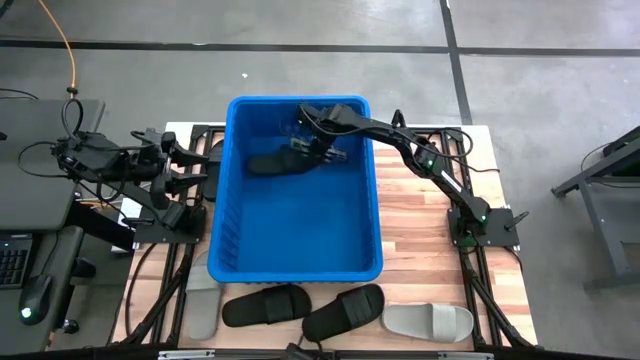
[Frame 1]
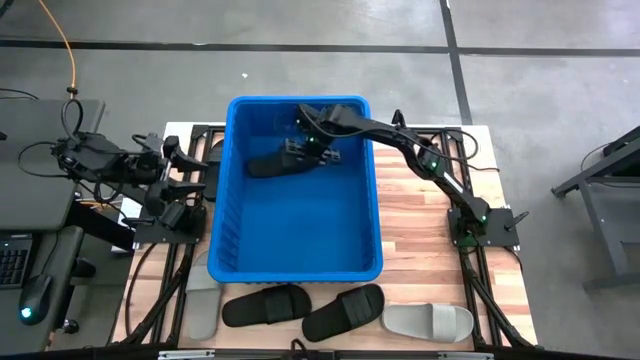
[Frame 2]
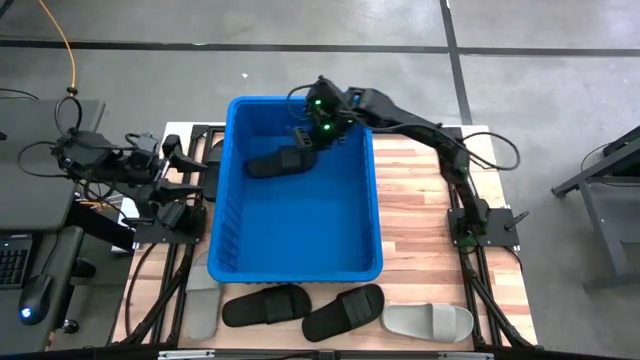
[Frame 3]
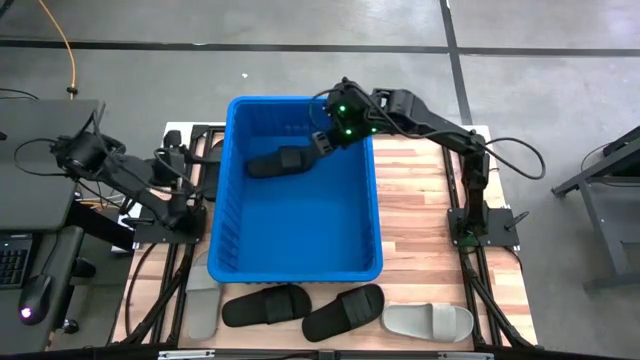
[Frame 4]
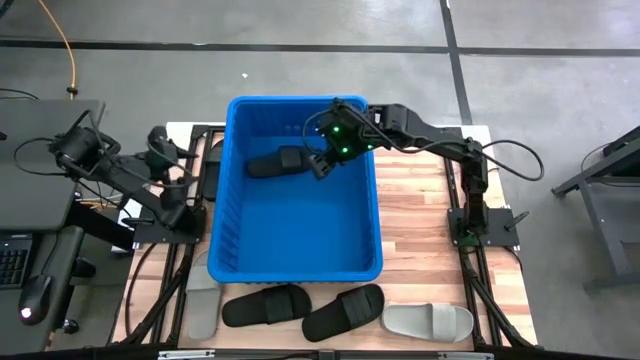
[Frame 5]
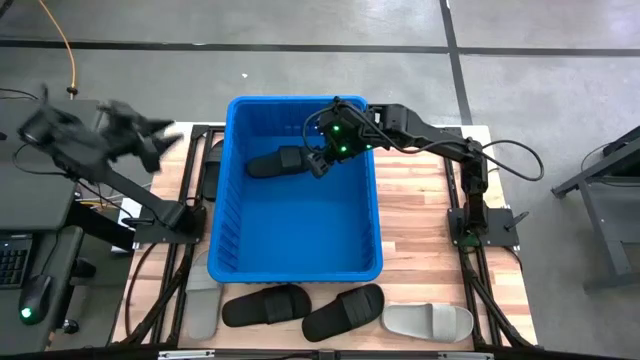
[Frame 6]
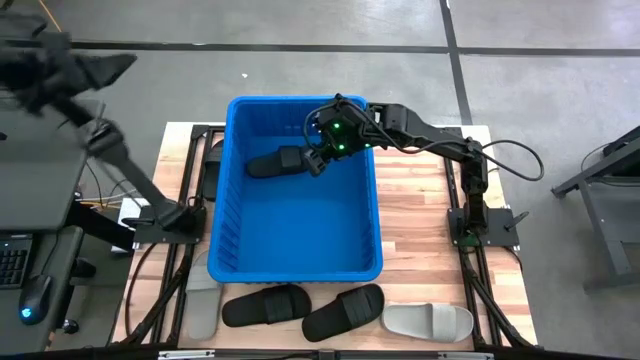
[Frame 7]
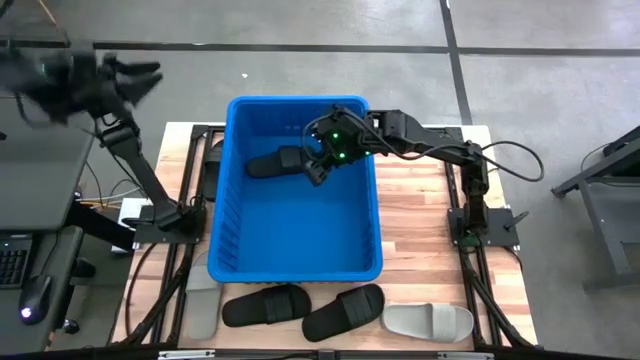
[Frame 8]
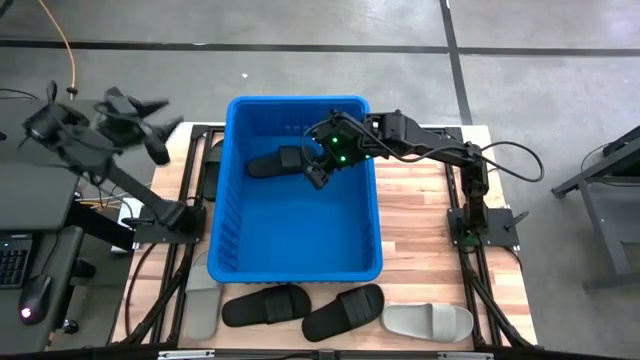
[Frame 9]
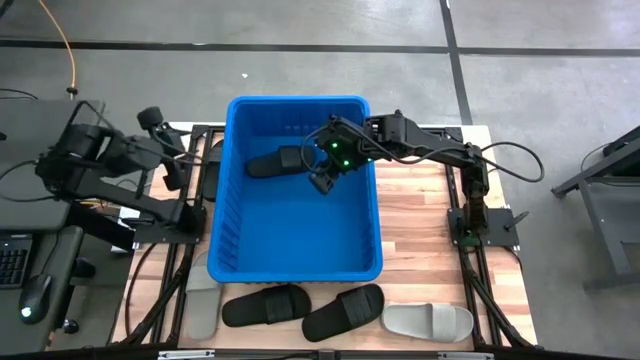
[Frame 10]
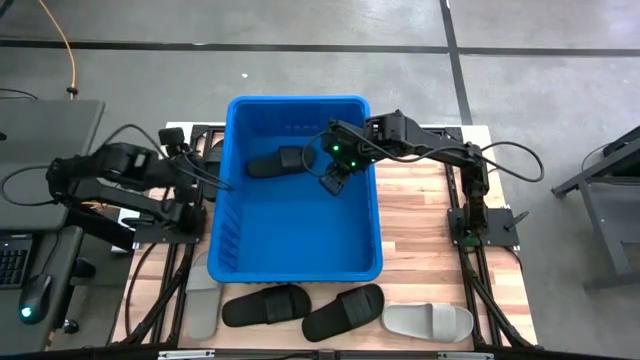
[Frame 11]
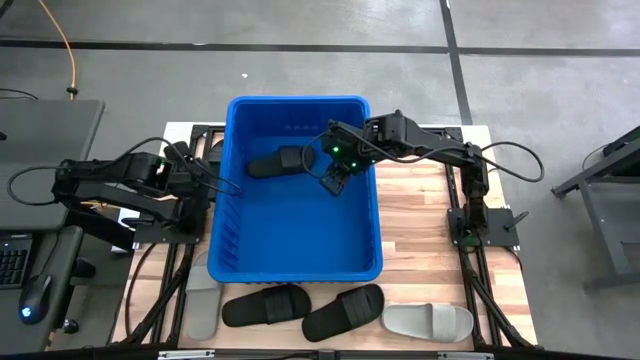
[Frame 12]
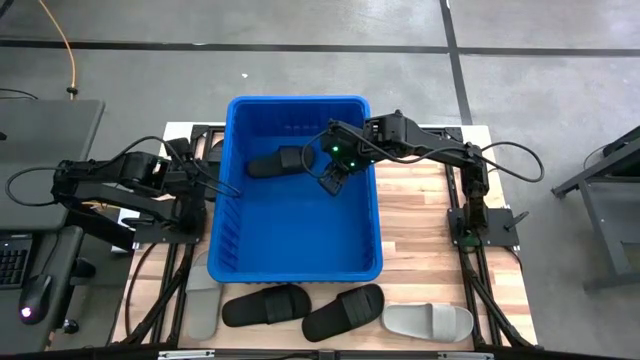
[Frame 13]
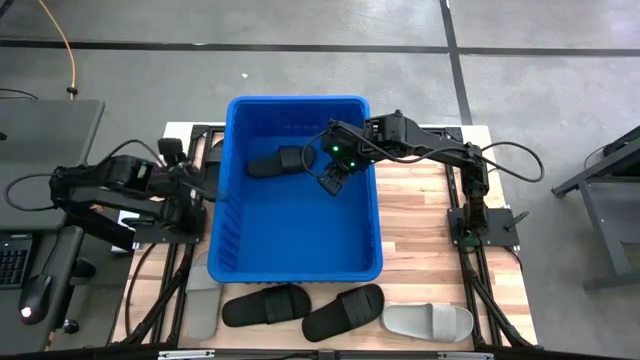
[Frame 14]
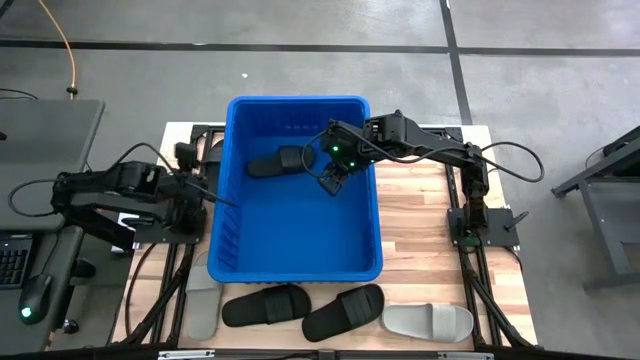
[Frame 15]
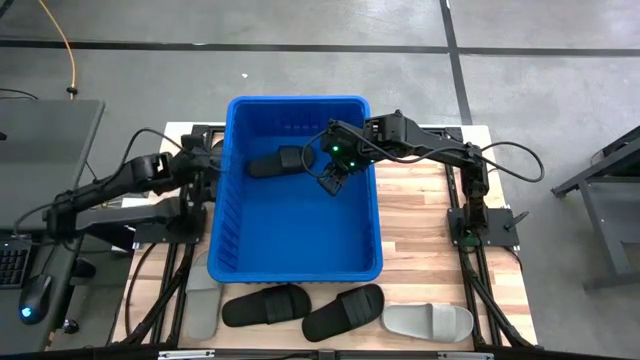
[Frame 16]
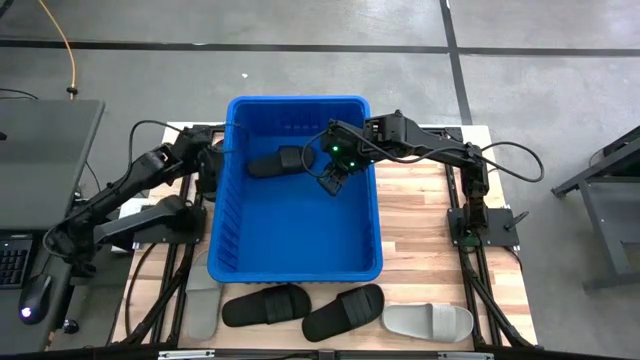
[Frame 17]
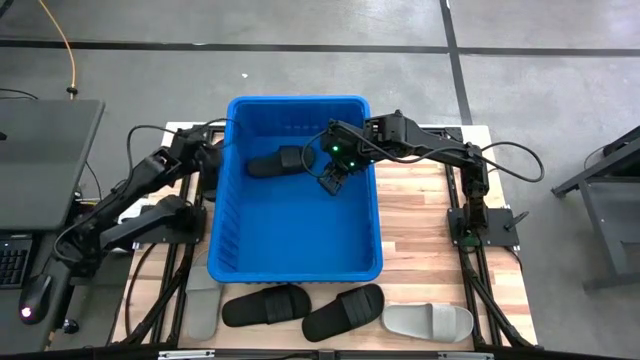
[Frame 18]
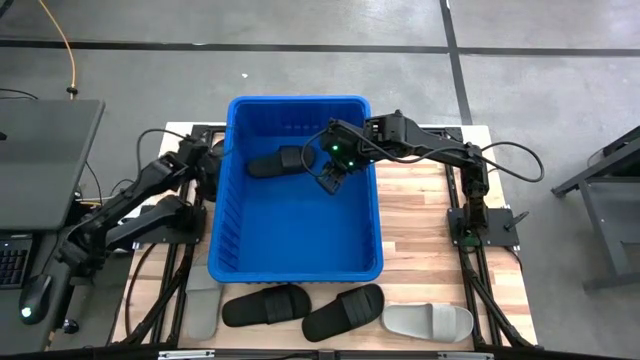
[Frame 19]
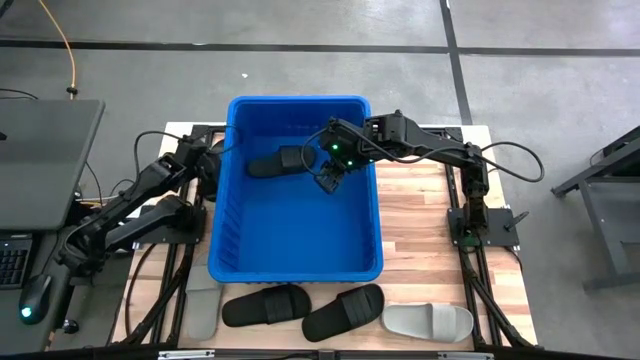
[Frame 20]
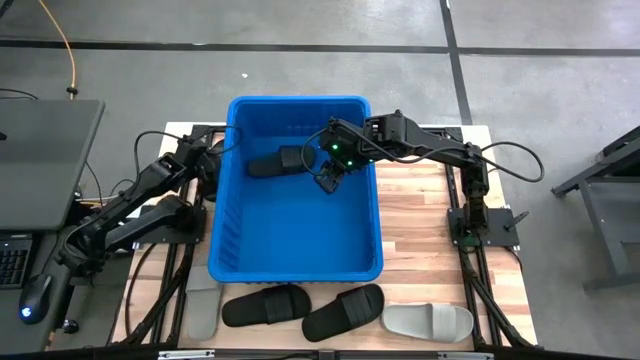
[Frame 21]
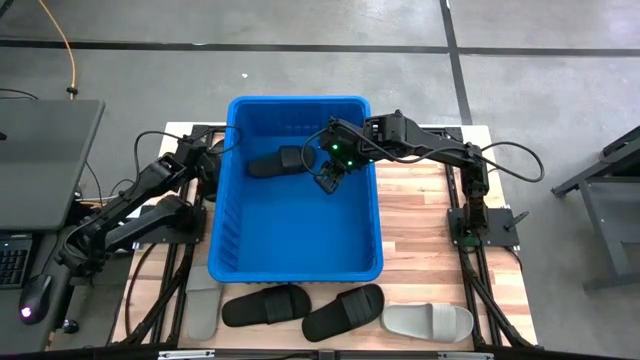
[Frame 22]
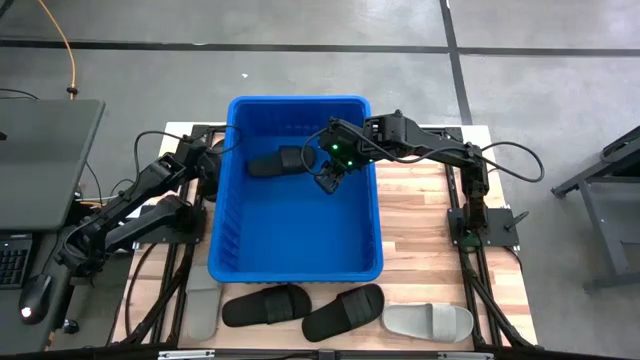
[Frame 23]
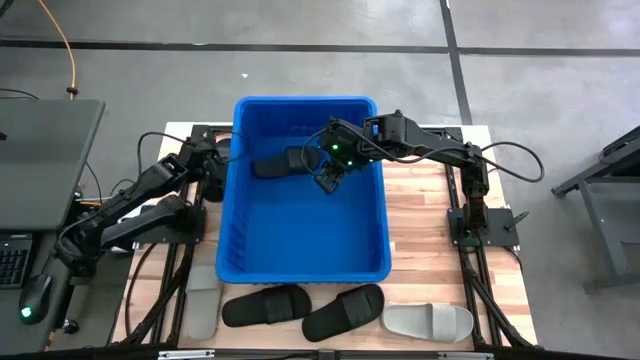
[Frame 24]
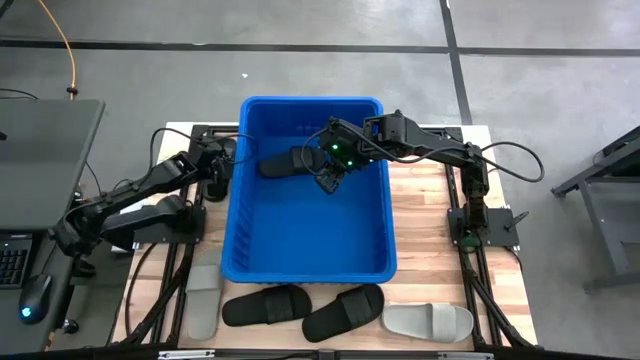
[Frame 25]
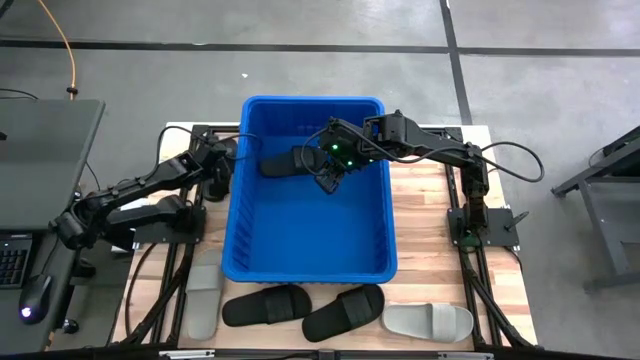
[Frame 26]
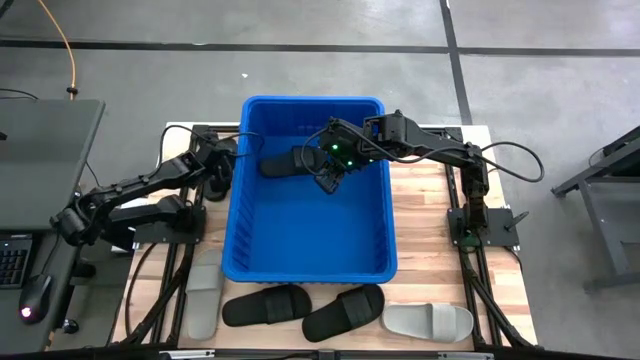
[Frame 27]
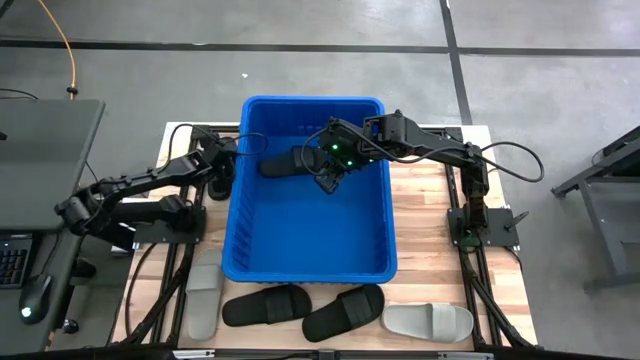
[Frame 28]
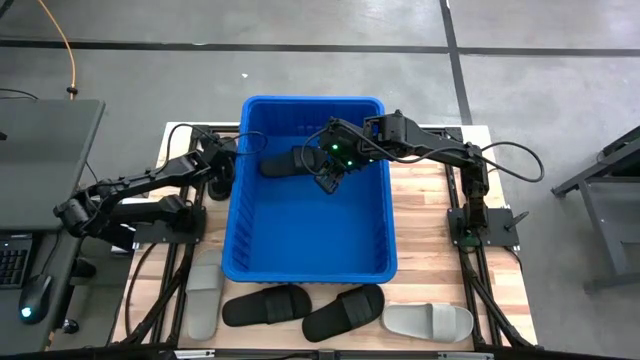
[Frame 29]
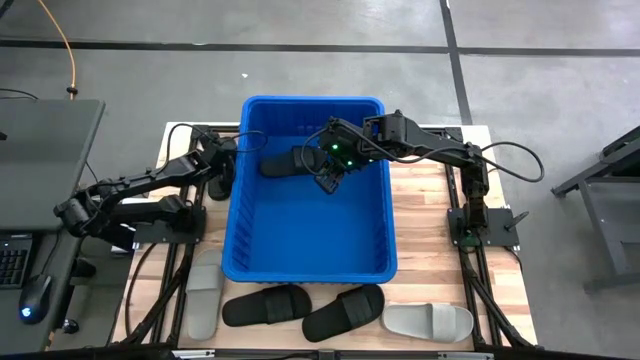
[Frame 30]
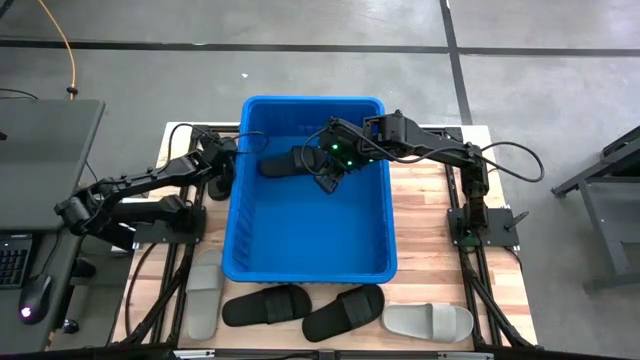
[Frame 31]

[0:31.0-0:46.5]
Task: Pick and place slides into bin
Put the top black slide into the blue container

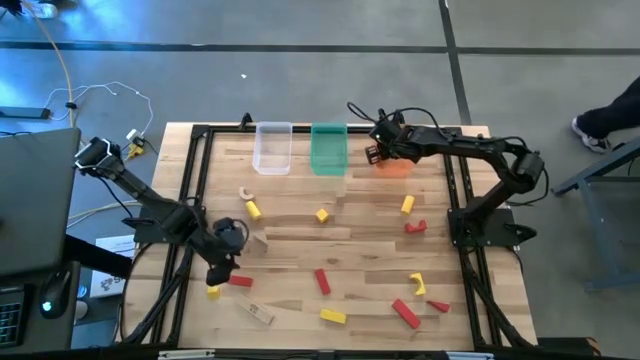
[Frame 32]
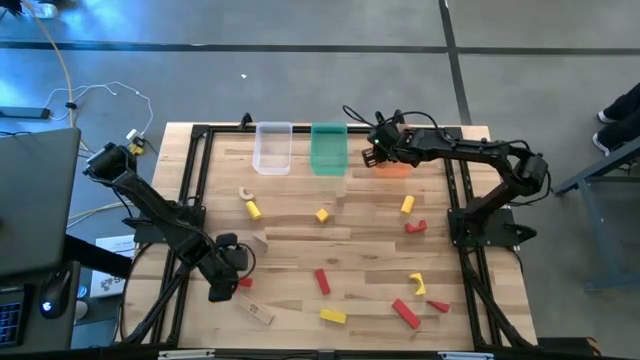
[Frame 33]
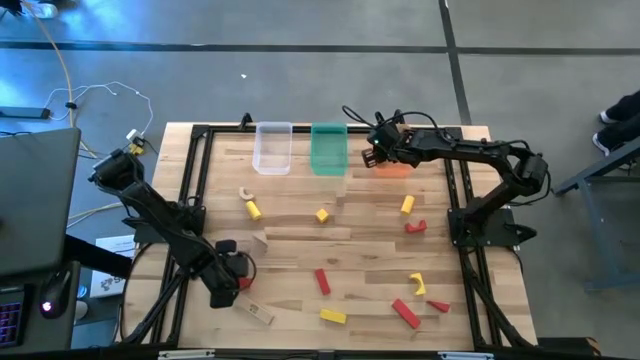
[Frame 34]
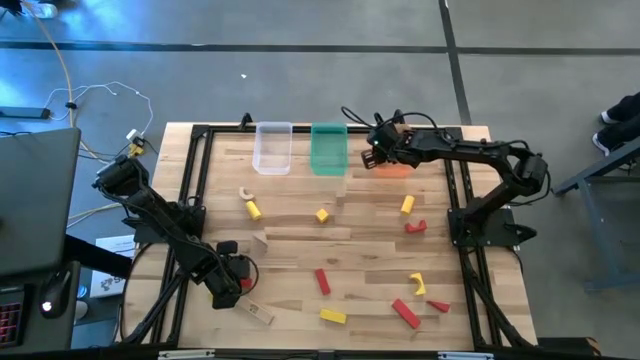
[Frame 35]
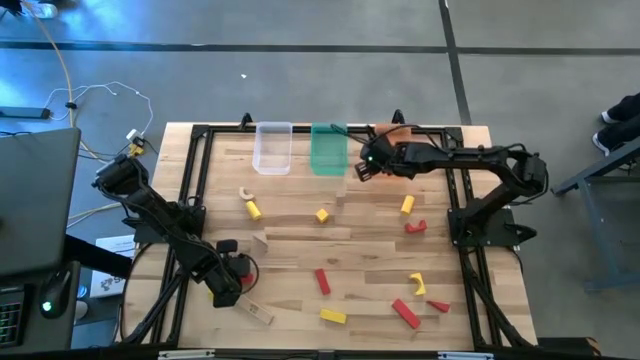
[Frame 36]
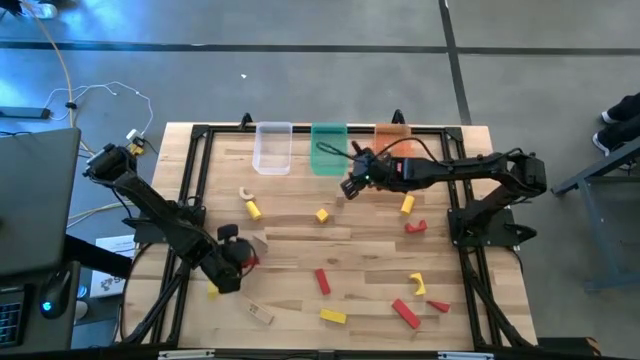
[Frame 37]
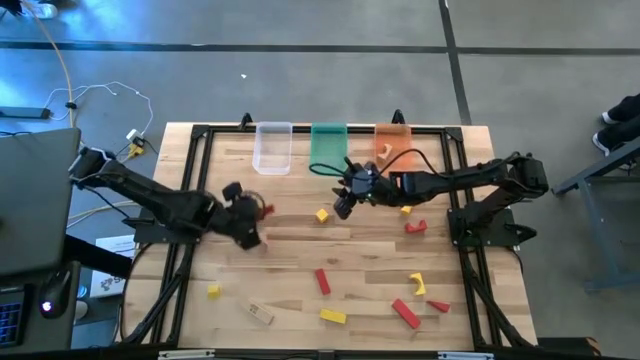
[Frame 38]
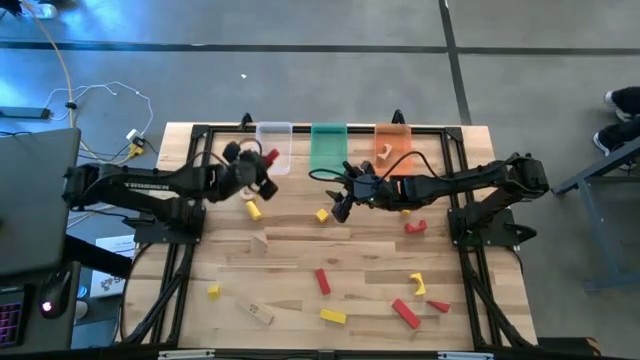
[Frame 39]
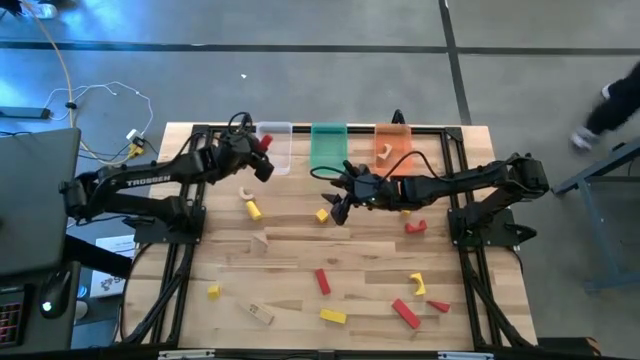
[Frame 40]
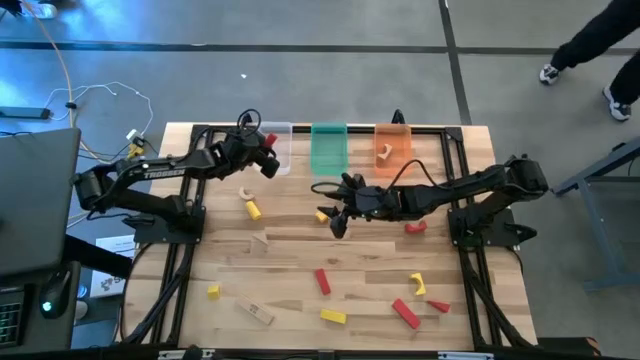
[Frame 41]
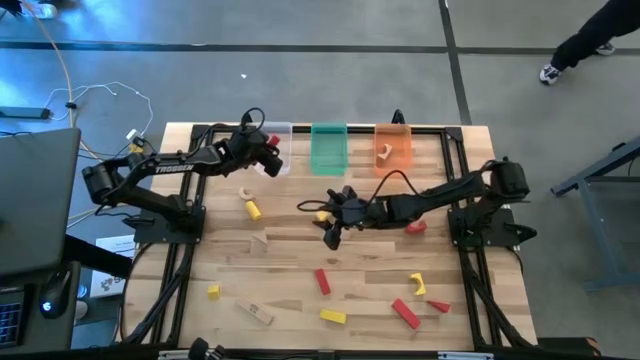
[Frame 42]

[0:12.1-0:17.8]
Task: Sort & place blocks by color
Put the red block into the white bin
